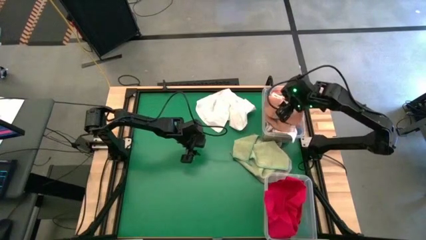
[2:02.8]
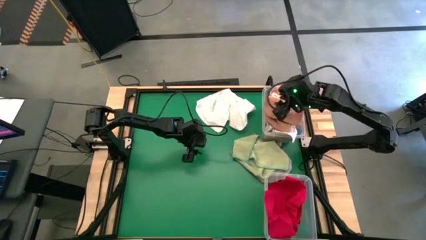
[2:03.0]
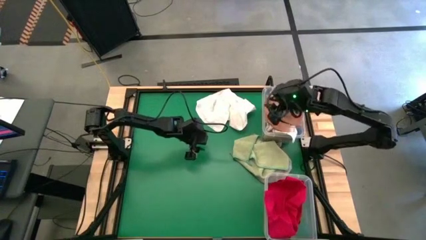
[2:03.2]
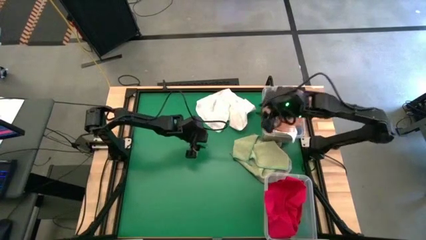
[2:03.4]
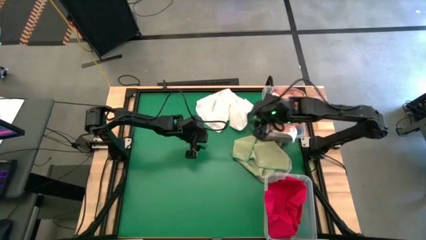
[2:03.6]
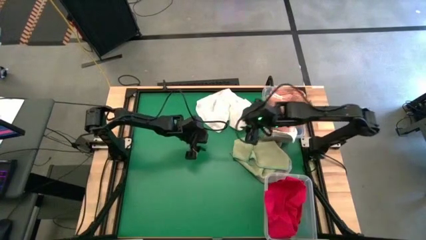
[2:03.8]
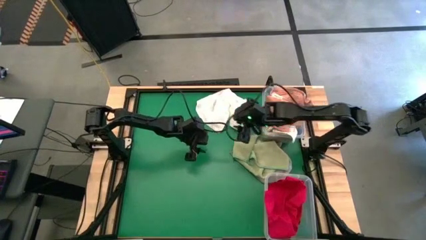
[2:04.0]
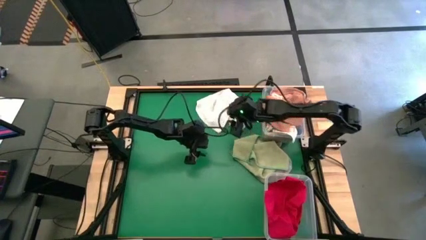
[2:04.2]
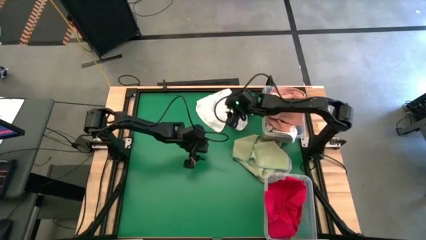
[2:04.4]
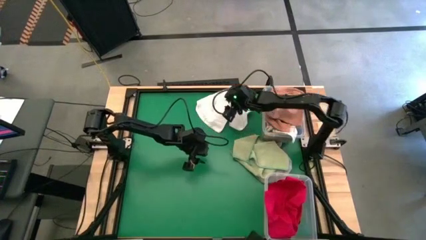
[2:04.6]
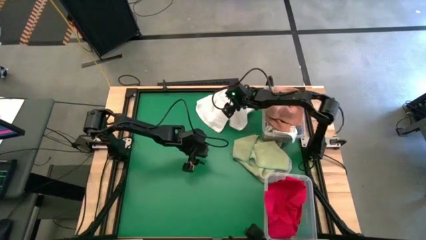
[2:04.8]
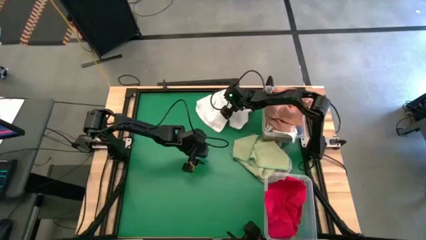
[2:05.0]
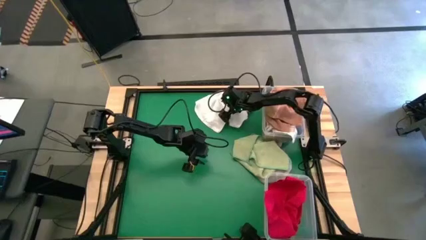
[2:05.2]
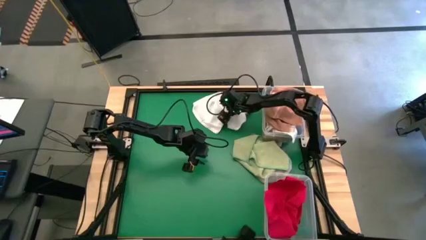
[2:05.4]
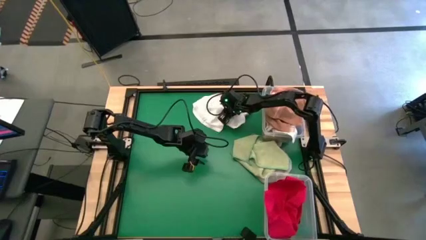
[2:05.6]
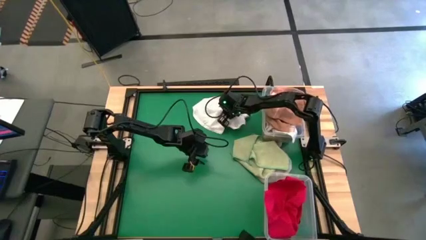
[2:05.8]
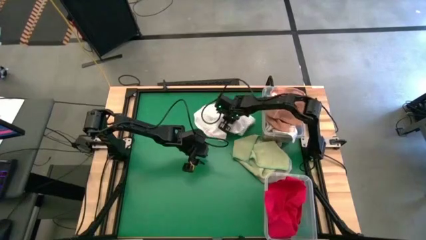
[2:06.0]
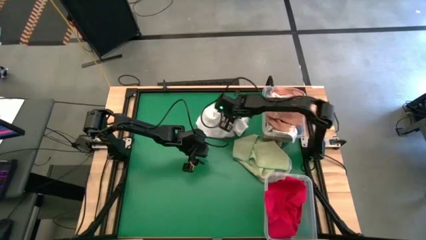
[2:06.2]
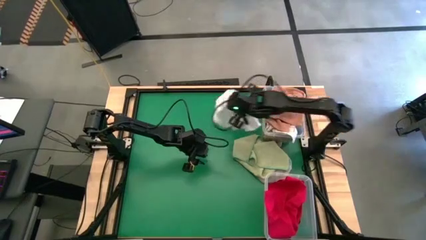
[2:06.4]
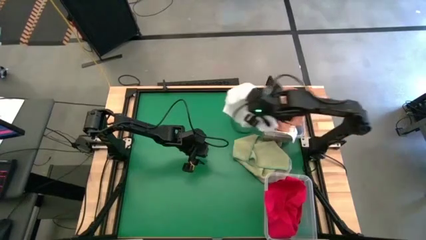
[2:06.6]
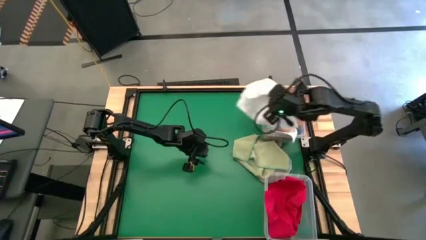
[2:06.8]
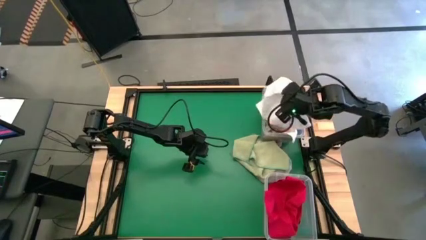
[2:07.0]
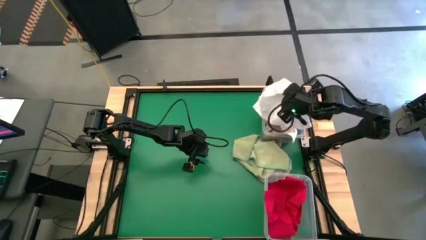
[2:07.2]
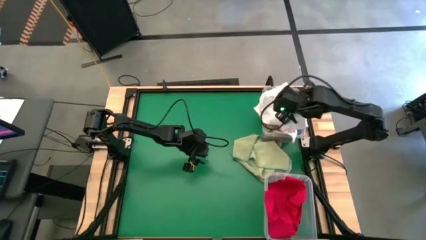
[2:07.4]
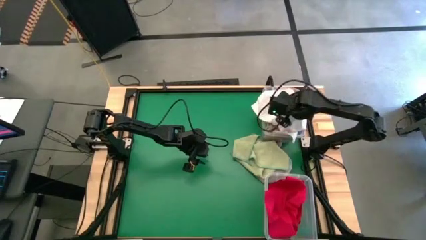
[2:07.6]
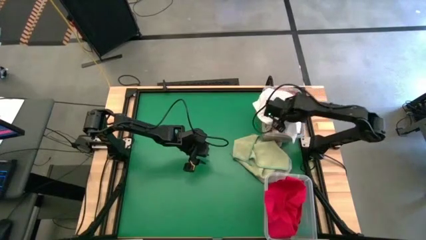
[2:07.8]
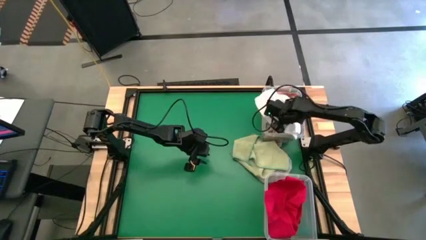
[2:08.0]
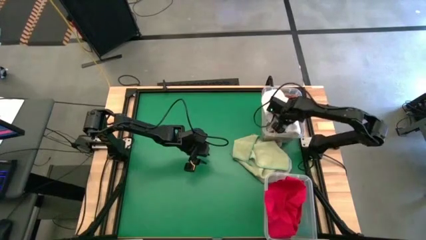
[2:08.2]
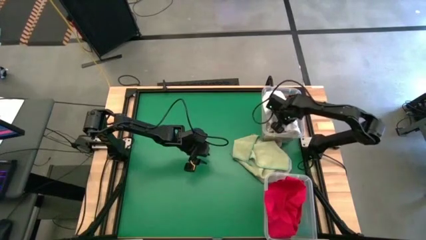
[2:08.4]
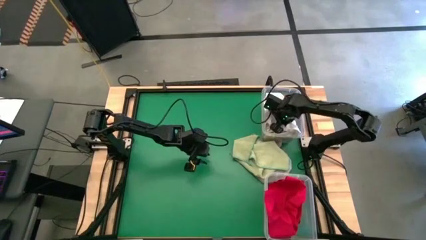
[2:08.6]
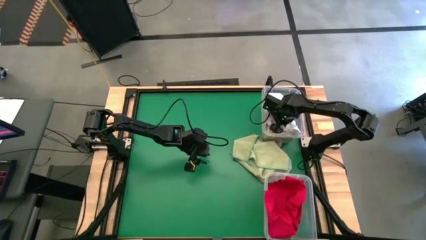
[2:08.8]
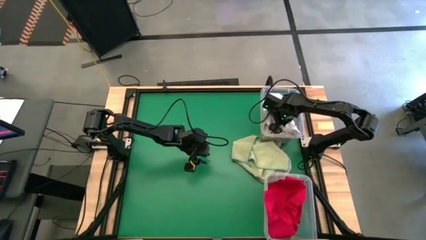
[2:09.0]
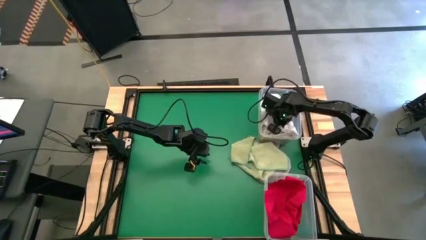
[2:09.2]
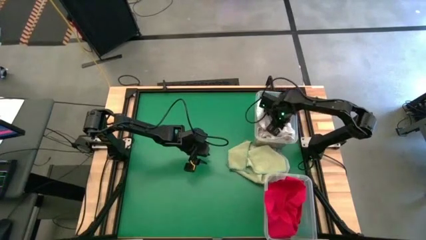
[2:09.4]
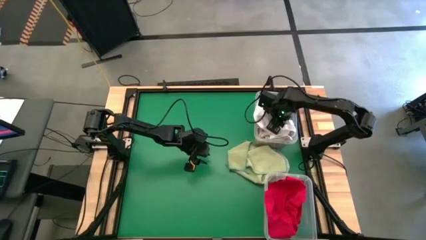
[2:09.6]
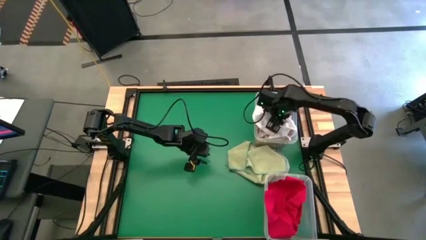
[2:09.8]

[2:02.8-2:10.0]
Task: Sort towels by color in basket
Put the white towel into the top transparent bin

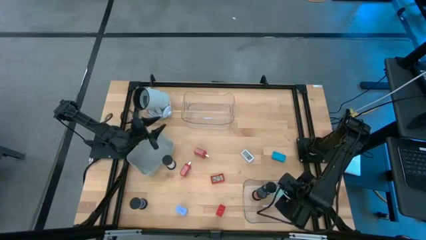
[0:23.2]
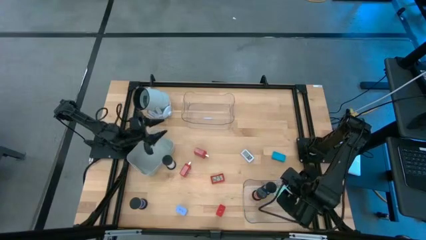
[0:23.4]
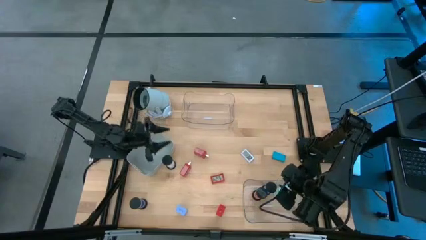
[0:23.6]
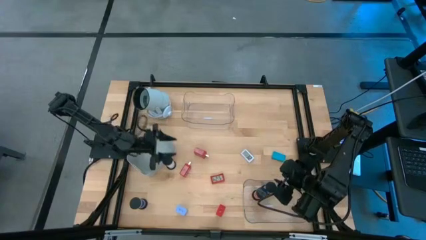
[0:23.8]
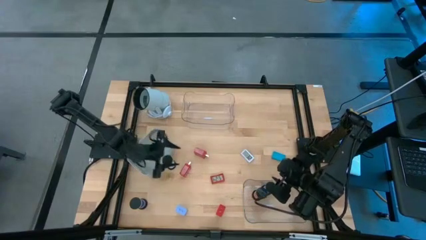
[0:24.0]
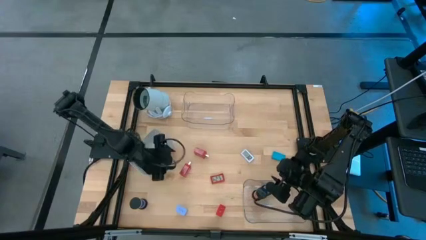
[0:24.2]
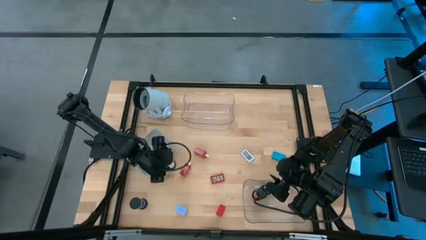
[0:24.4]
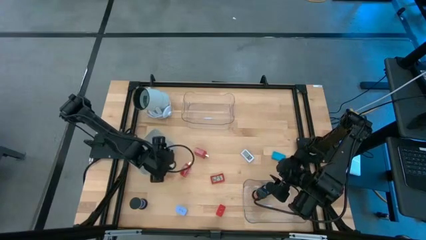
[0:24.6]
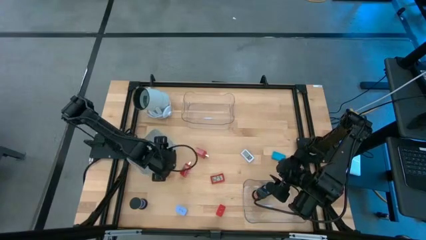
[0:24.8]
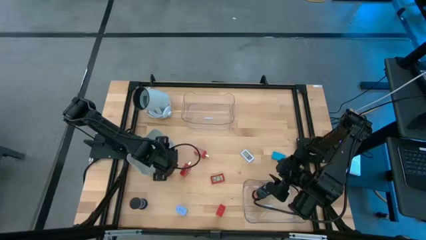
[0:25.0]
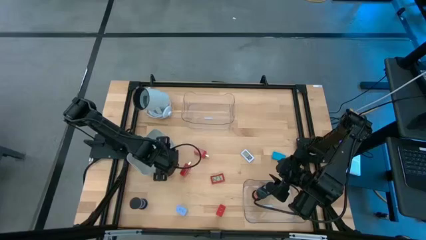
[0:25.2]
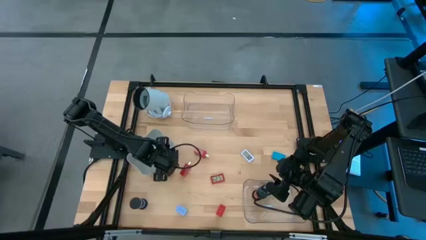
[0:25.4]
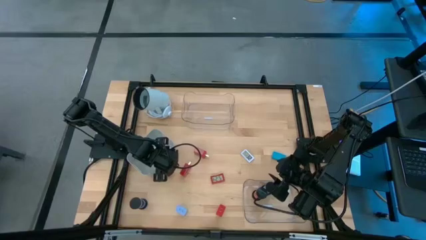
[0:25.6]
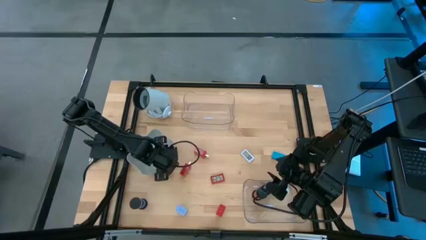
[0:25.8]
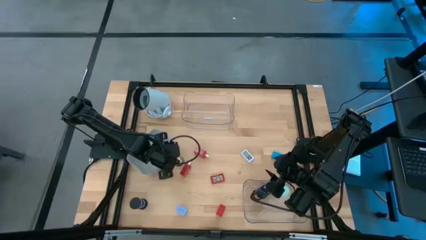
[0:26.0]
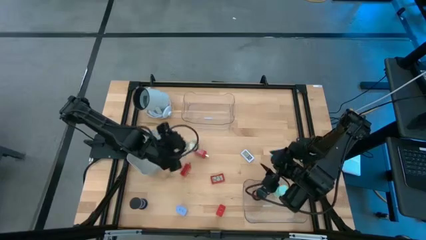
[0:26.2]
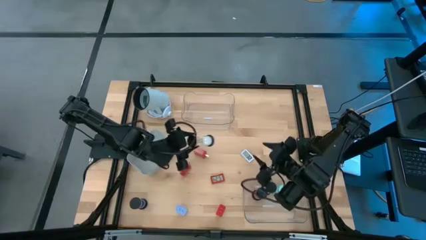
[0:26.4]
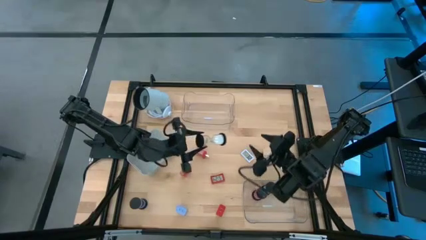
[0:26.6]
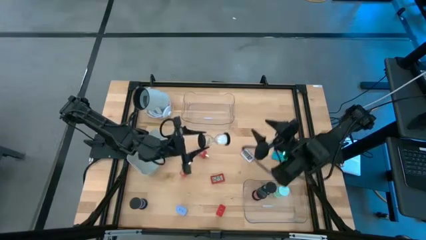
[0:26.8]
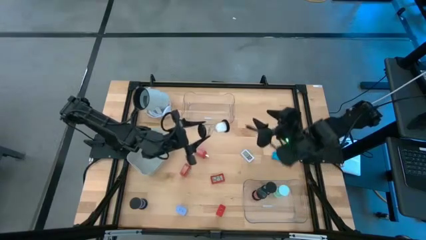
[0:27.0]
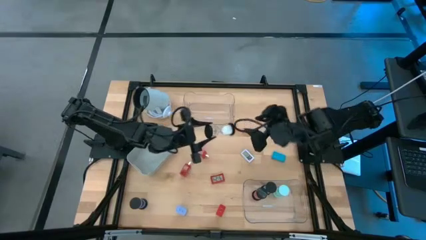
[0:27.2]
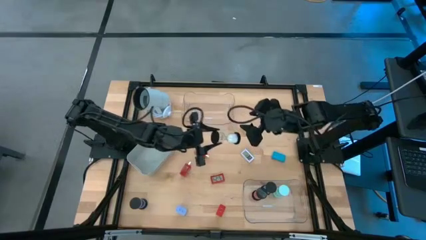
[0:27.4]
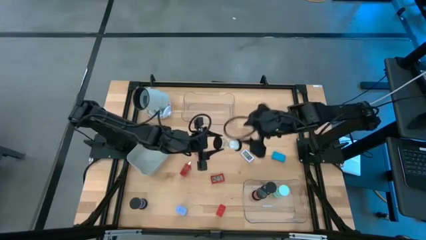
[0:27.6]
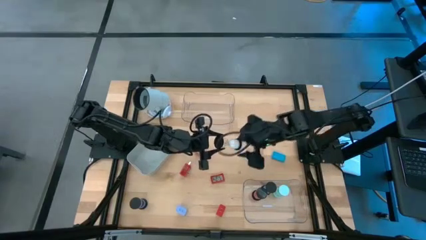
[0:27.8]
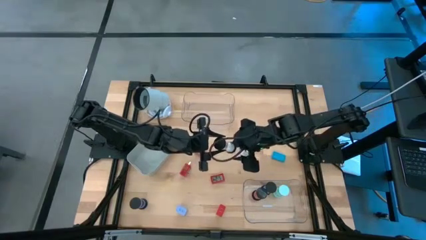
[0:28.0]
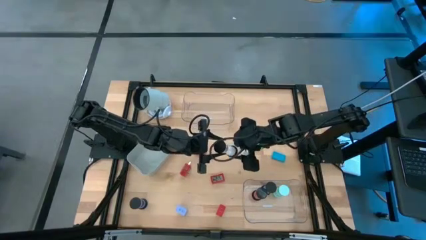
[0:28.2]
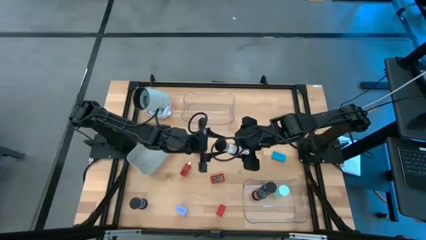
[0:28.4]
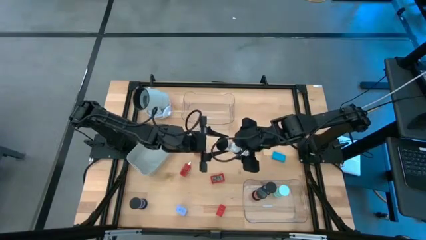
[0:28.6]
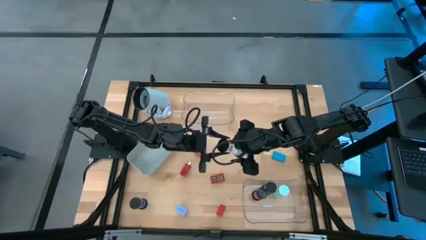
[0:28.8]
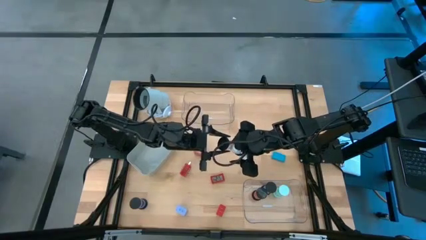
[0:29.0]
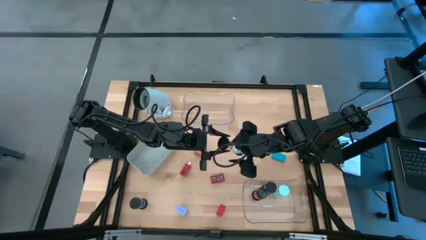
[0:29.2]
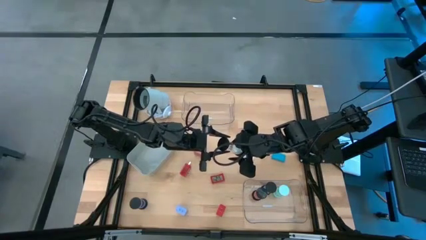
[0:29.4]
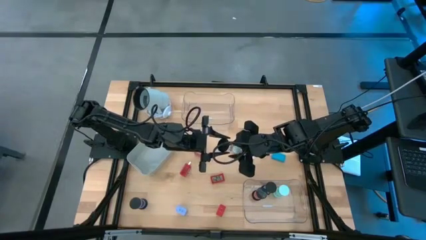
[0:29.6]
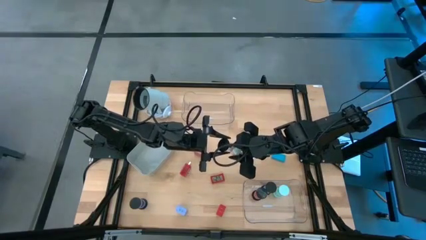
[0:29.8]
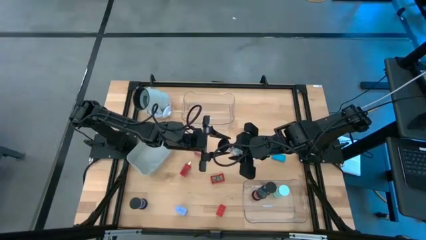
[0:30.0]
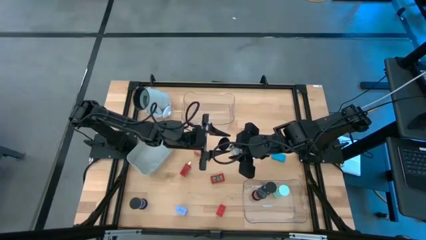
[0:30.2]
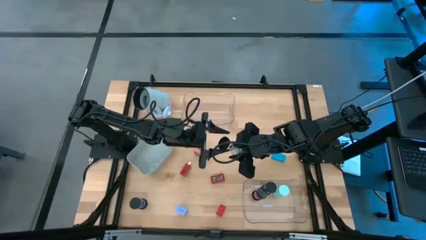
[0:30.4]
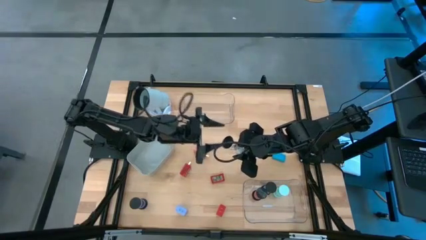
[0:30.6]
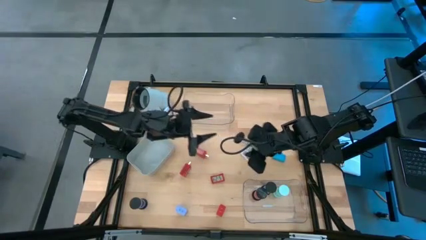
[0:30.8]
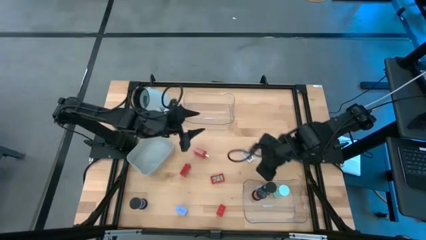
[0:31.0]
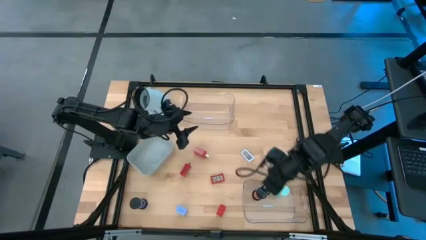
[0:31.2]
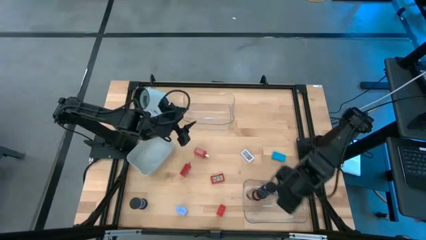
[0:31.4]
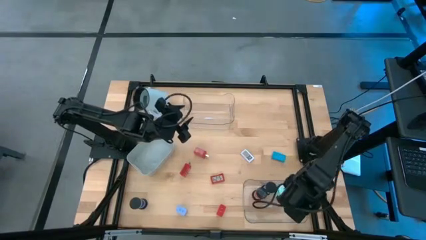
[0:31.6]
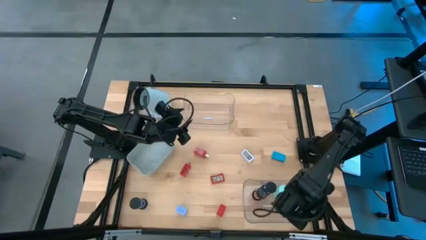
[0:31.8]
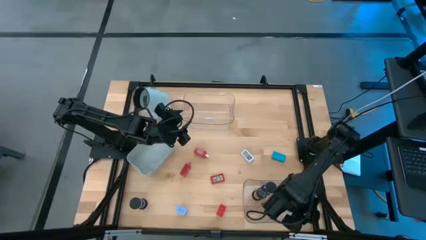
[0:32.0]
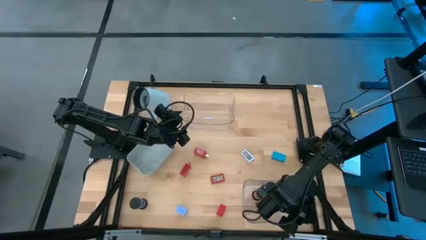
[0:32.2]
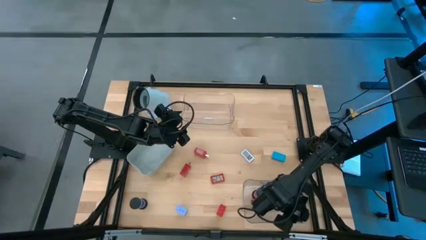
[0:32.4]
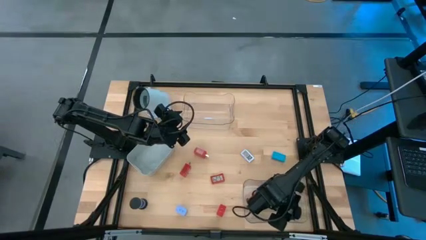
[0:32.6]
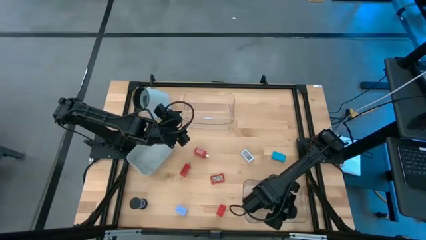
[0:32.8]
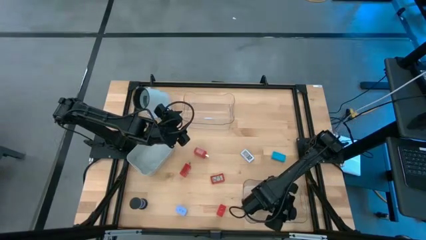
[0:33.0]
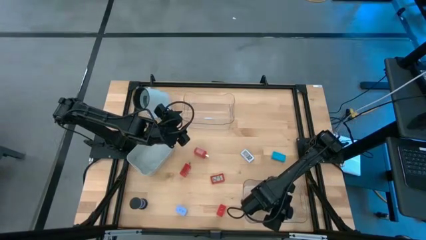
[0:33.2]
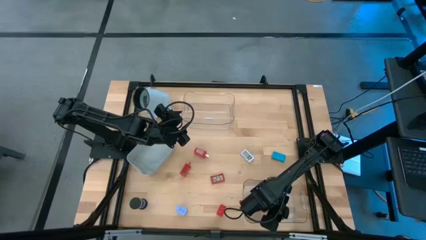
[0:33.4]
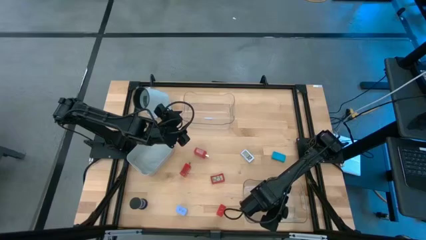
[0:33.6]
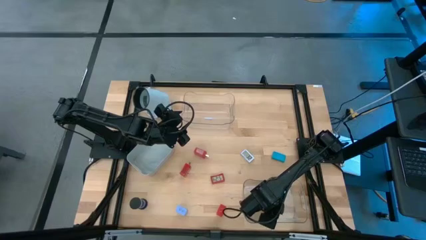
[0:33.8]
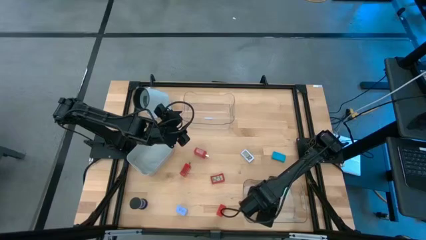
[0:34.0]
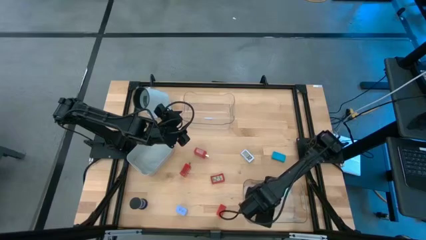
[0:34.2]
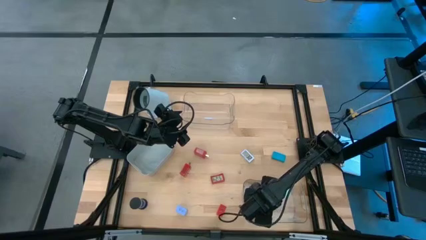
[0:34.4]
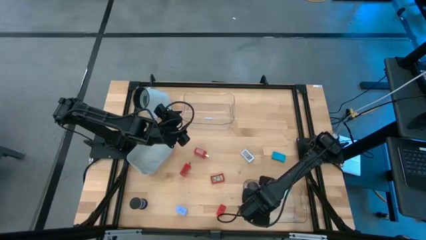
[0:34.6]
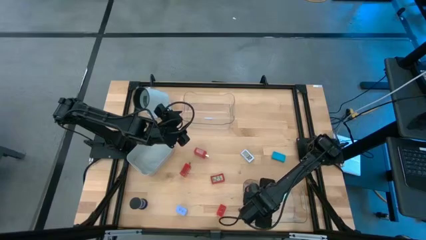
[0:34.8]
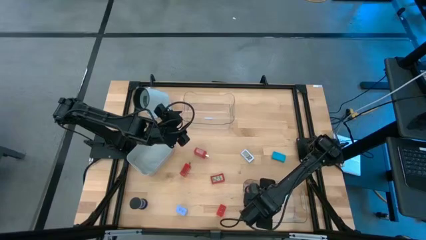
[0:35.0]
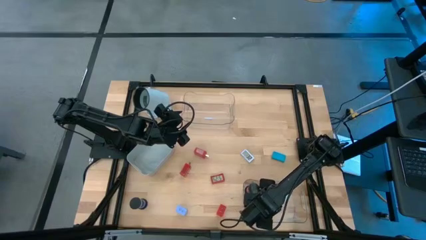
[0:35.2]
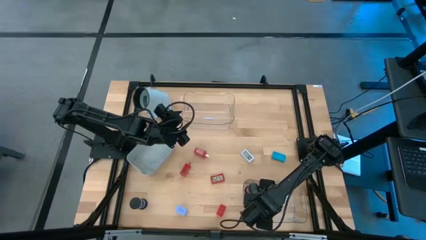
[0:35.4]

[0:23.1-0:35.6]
Task: Pick & Place Office items
Put the white hourglass into the bottom transparent bin
